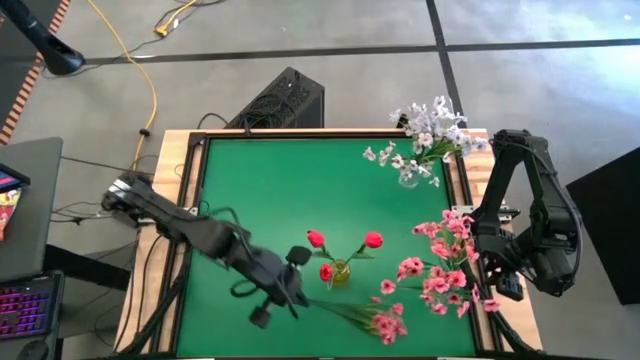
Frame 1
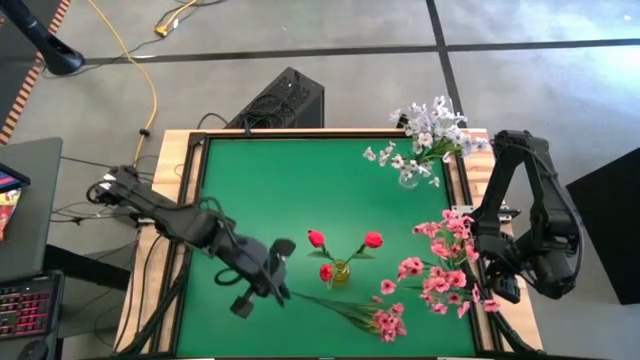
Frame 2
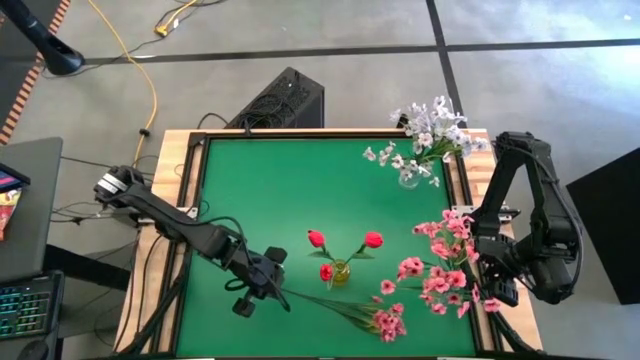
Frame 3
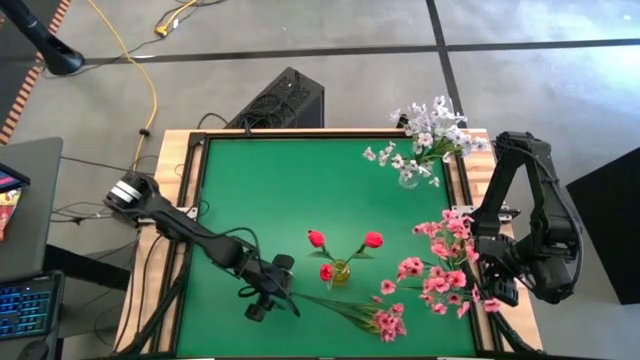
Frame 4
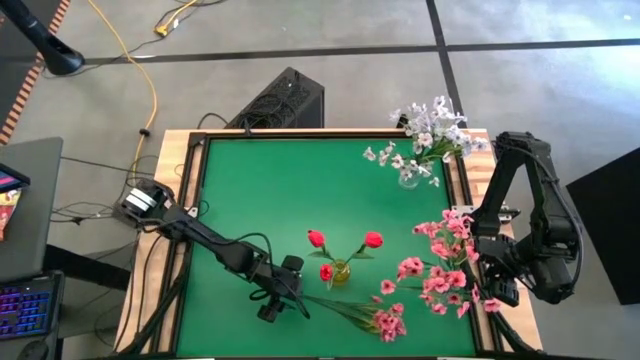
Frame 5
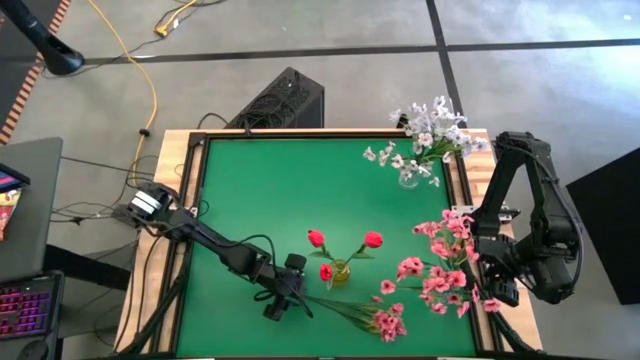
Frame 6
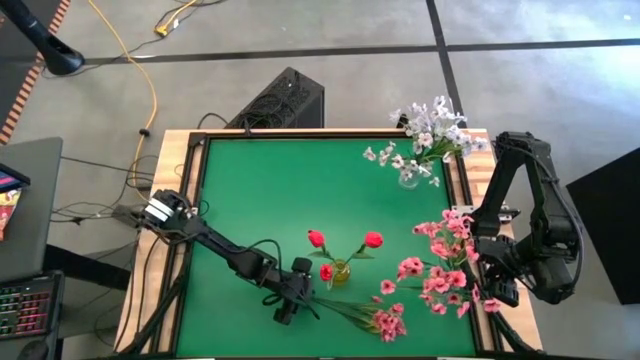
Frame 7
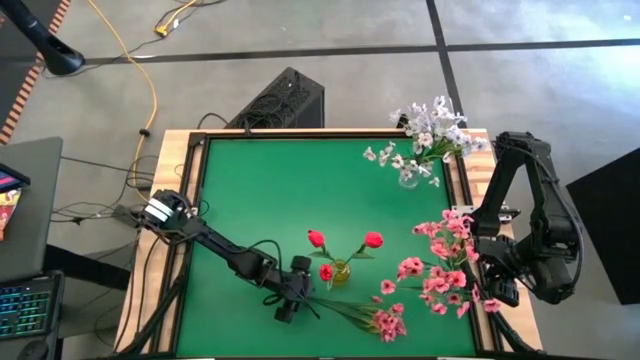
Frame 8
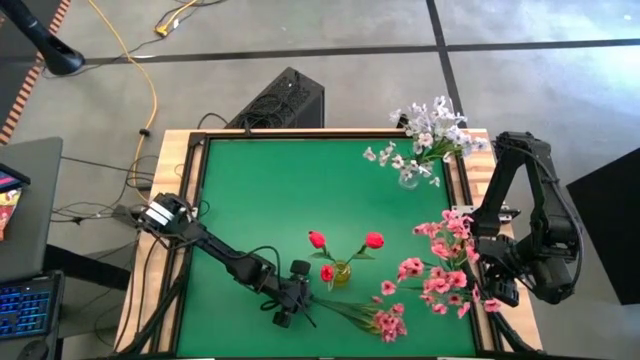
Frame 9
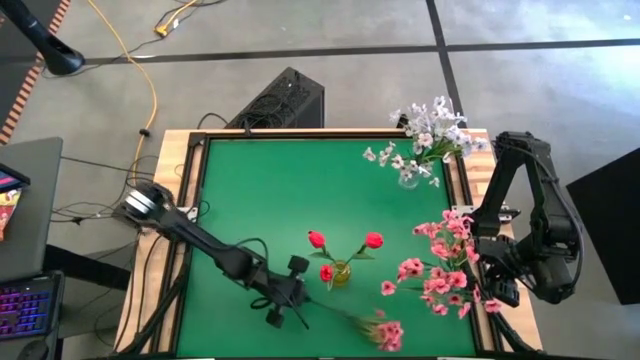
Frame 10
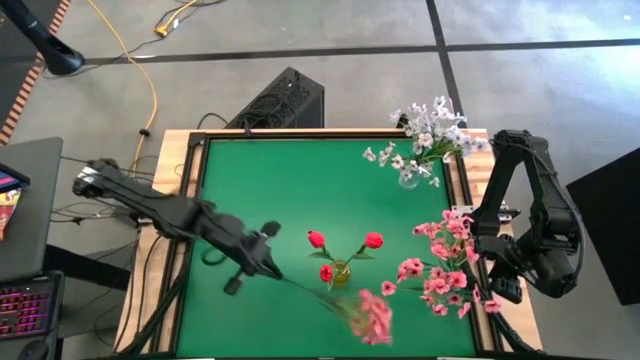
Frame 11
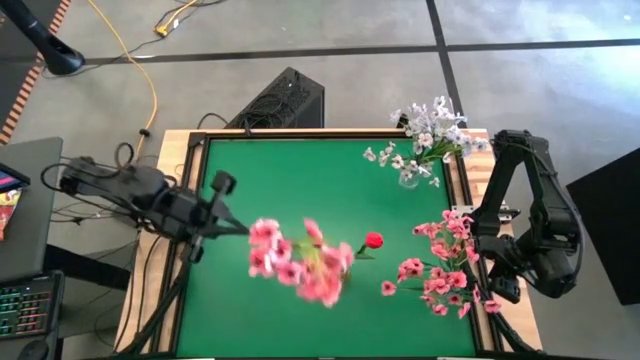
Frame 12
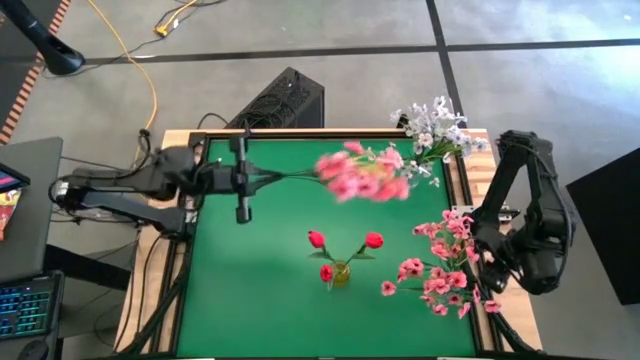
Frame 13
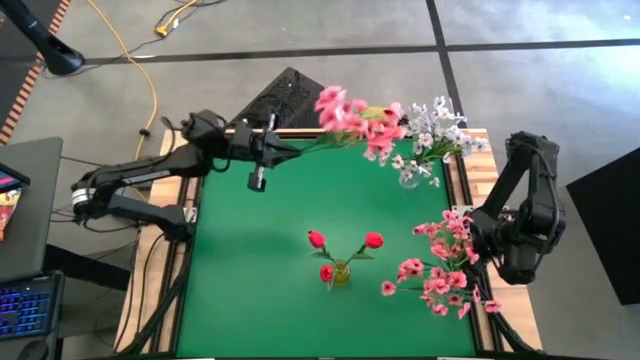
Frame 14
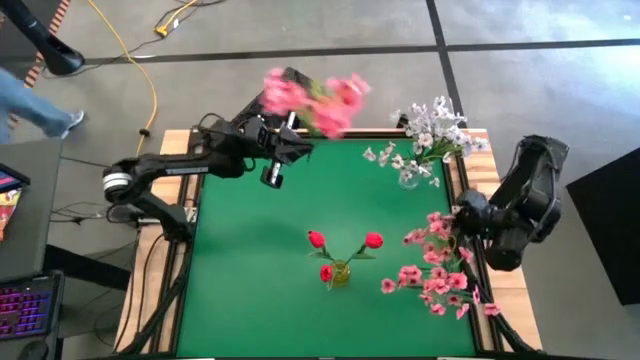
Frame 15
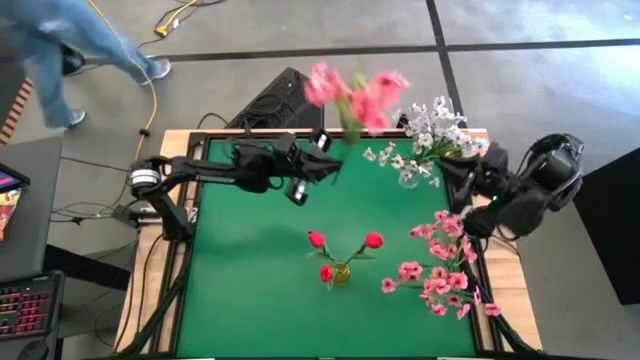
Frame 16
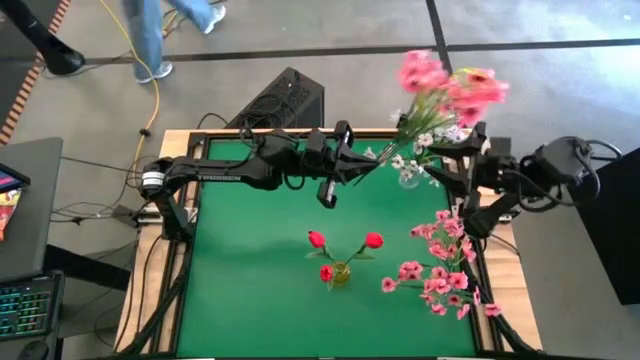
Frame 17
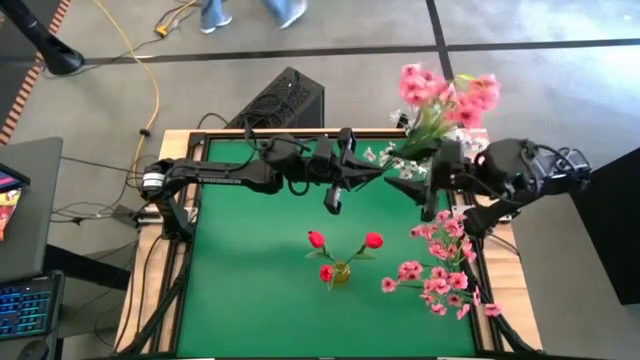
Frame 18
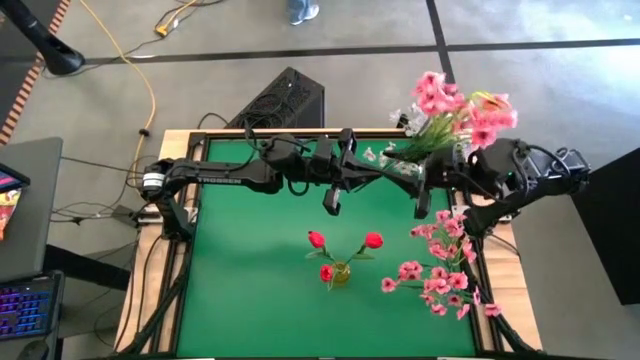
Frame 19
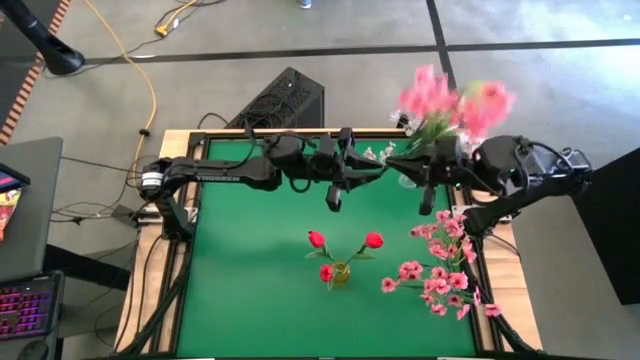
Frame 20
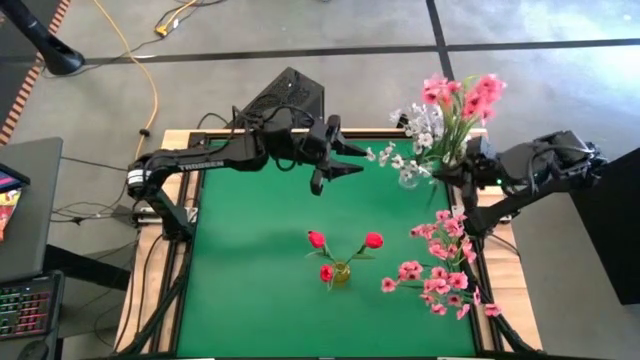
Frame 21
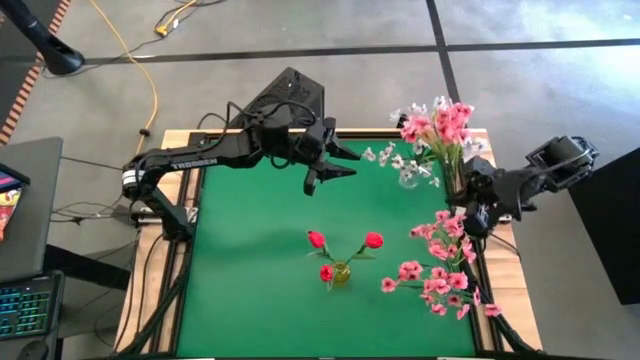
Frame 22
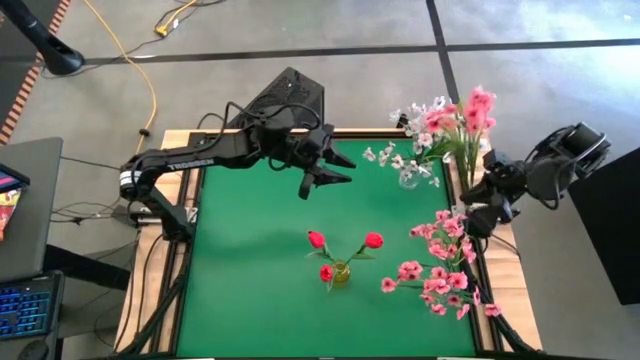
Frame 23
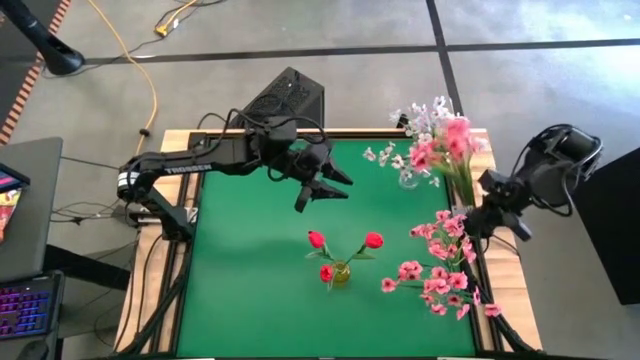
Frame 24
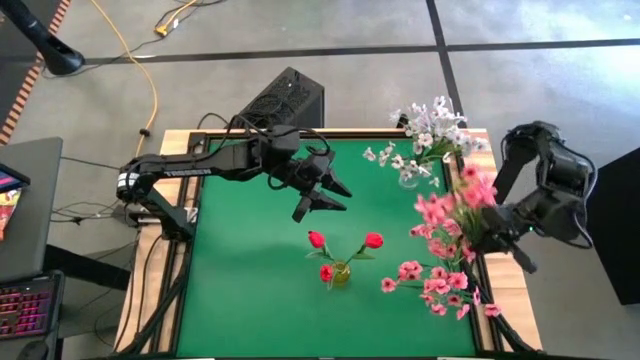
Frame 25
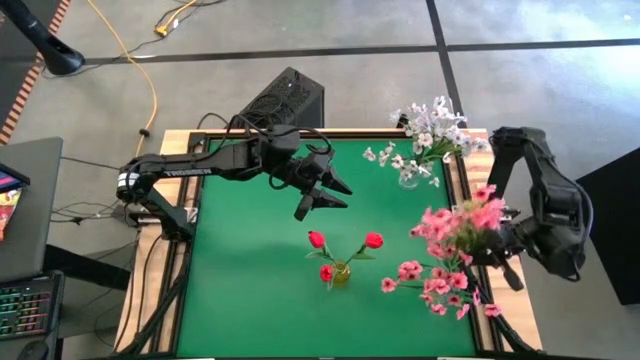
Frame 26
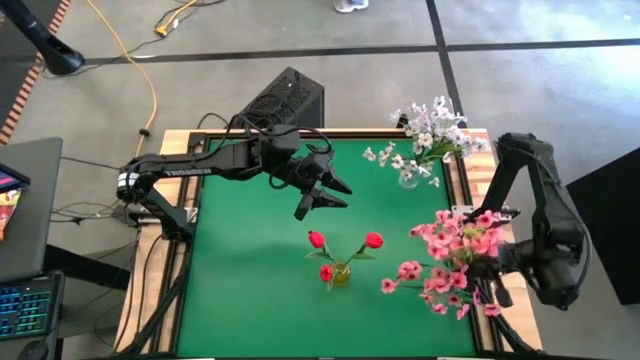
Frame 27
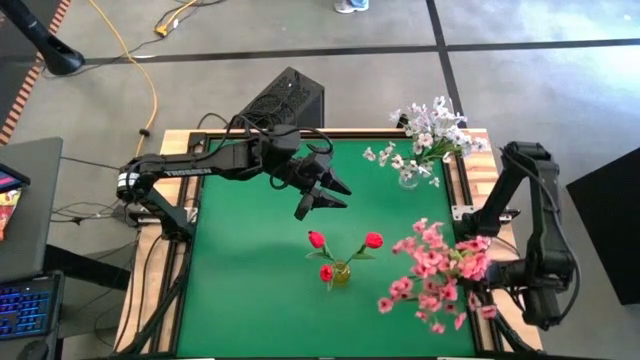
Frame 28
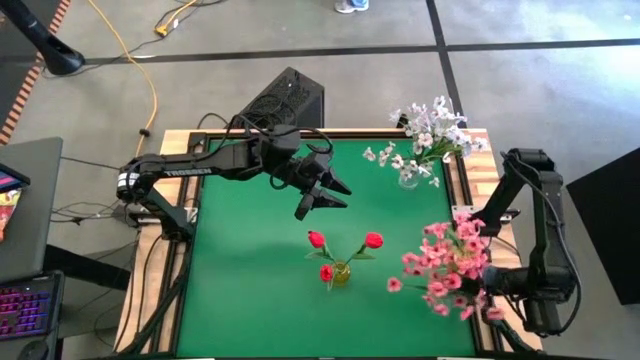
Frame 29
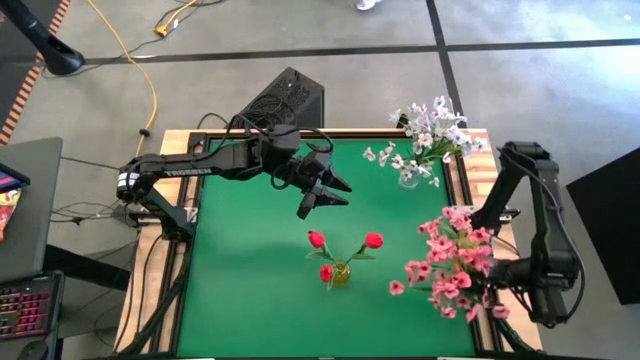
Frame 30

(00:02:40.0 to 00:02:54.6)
Task: Sort flowers into vase by color
Put the bottom middle pink flowers into the bottom transparent vase

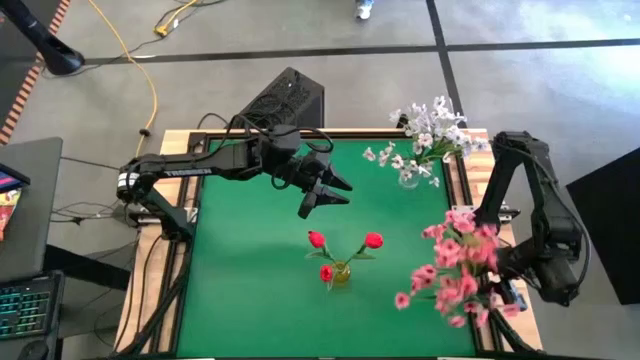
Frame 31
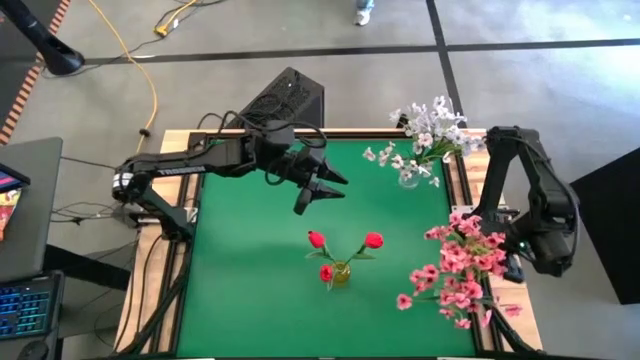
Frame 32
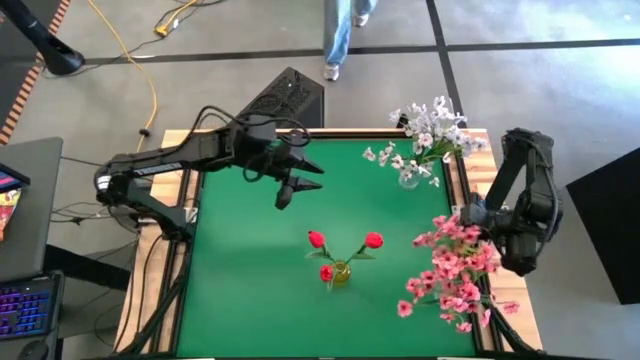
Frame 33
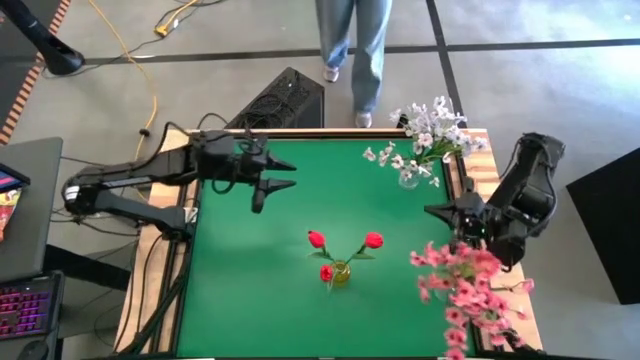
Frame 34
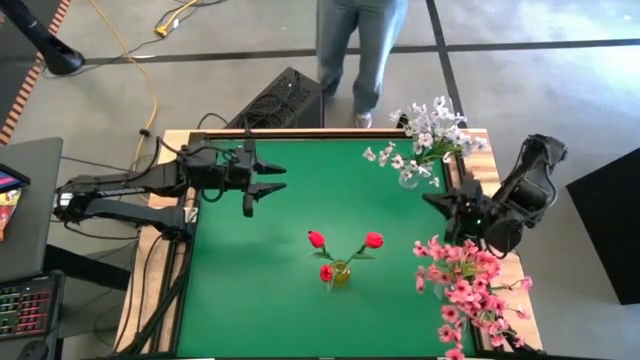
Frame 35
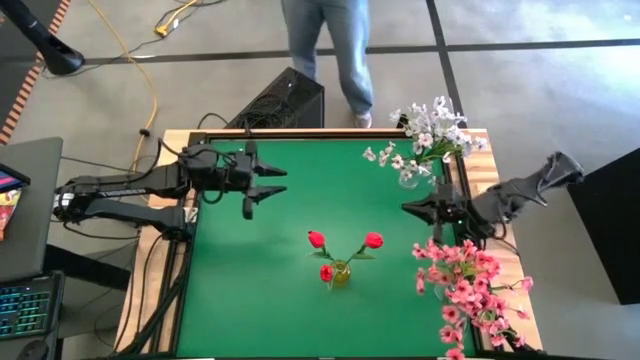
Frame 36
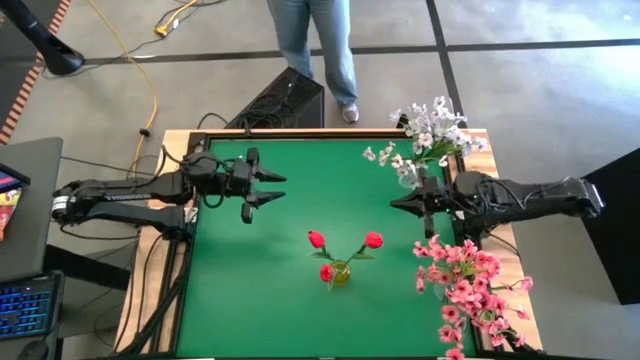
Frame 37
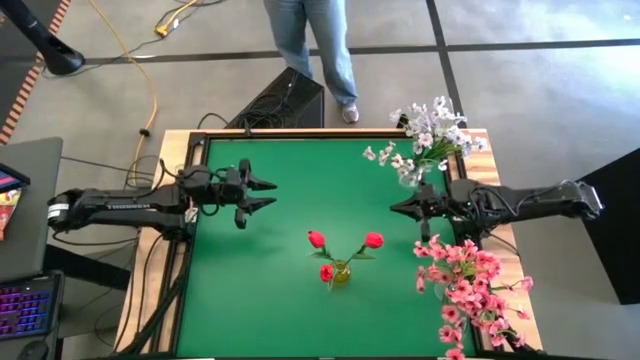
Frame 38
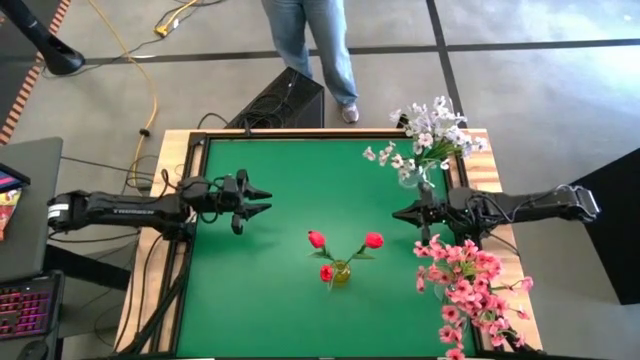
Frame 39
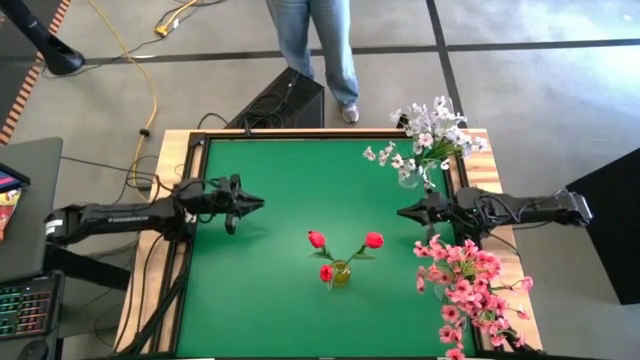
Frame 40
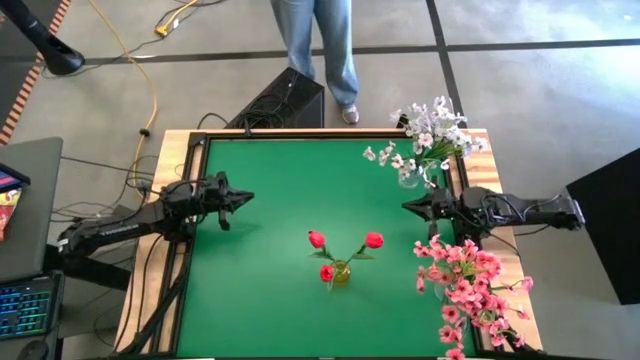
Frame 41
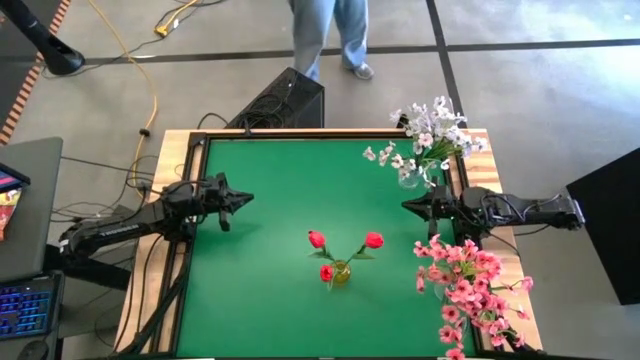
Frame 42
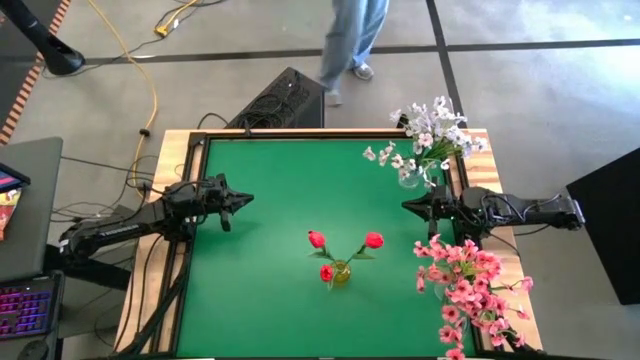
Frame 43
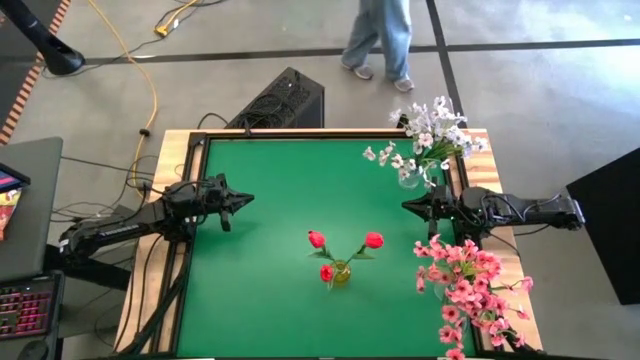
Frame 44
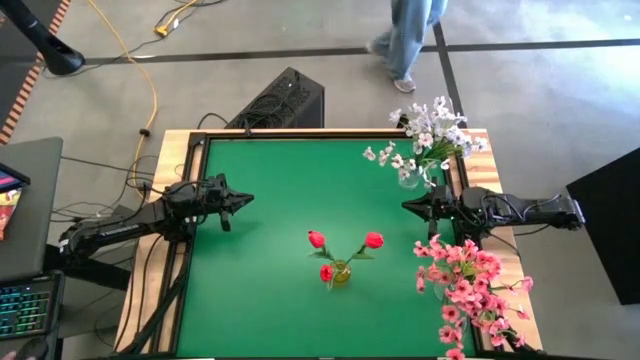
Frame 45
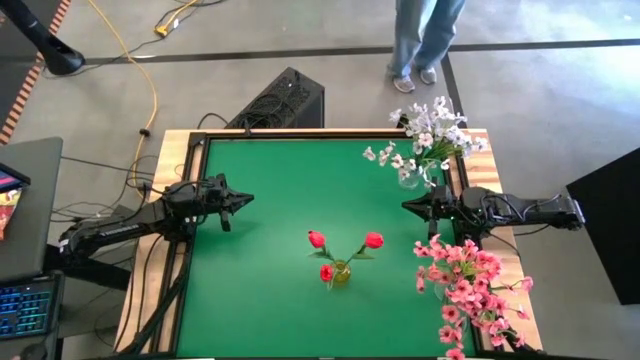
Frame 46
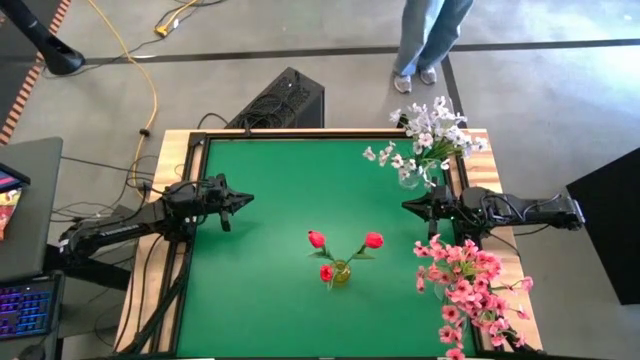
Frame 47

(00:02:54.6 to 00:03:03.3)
Return to home position
